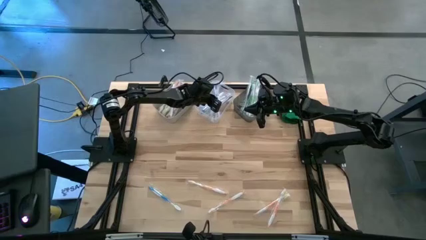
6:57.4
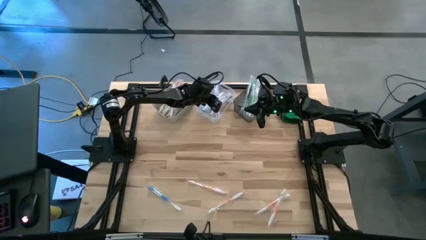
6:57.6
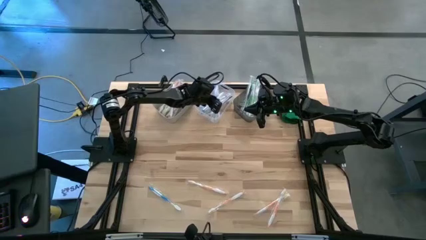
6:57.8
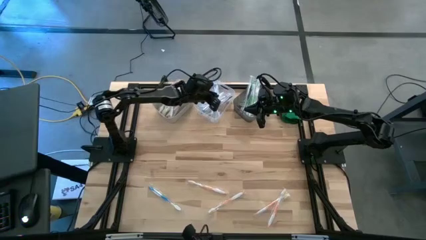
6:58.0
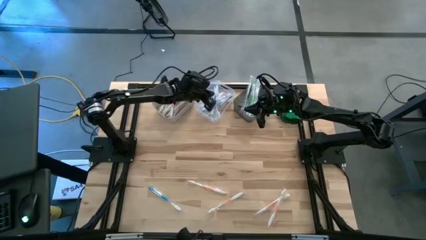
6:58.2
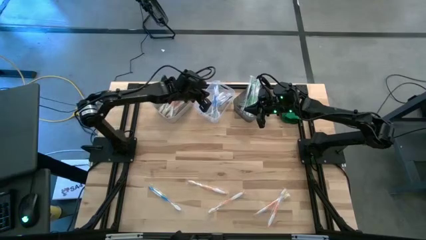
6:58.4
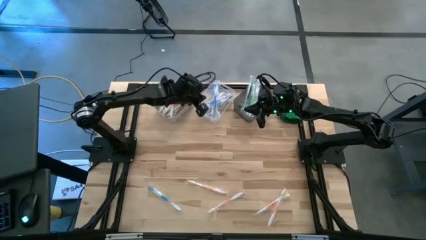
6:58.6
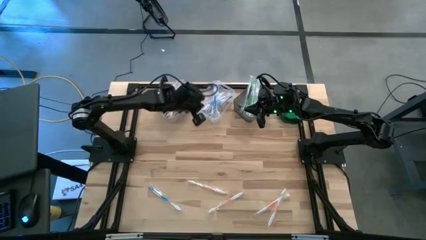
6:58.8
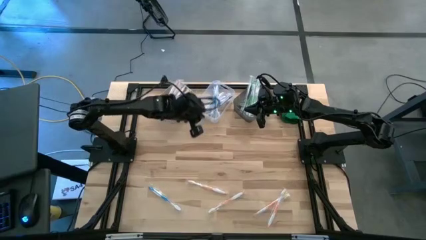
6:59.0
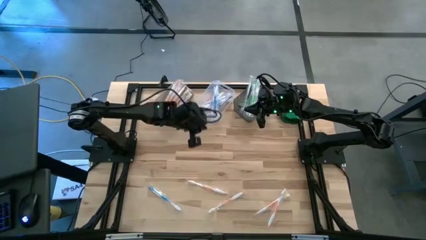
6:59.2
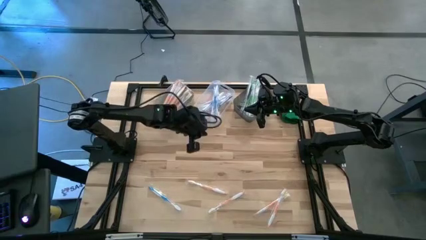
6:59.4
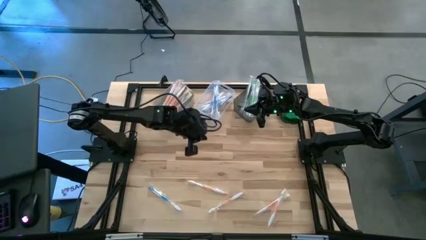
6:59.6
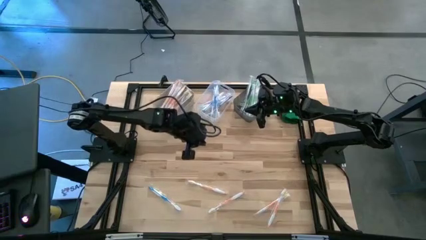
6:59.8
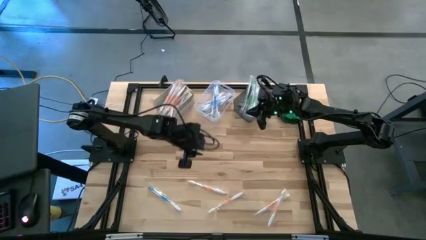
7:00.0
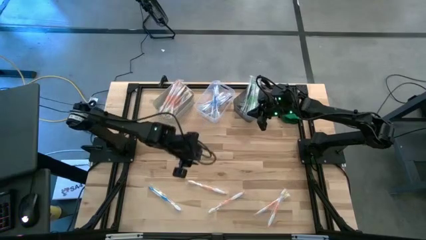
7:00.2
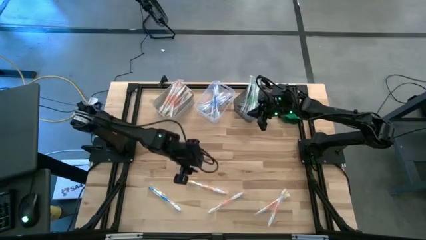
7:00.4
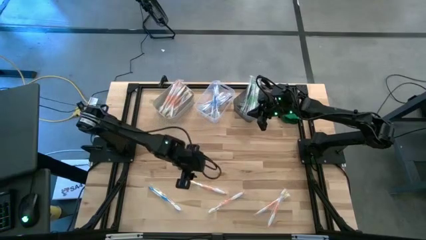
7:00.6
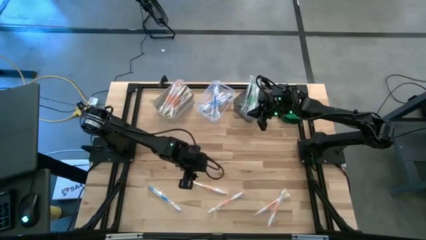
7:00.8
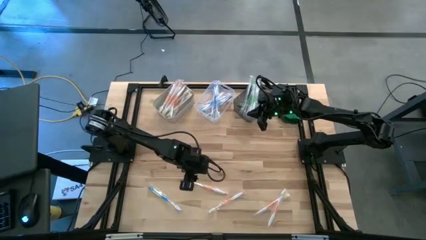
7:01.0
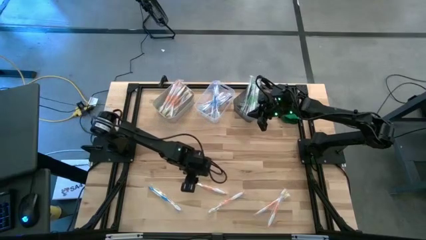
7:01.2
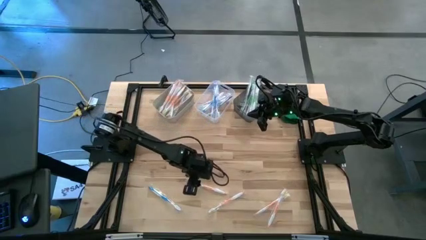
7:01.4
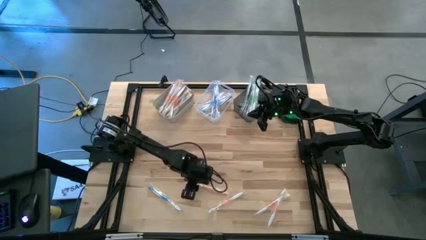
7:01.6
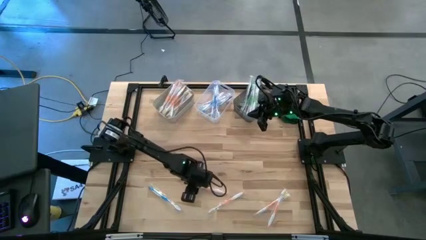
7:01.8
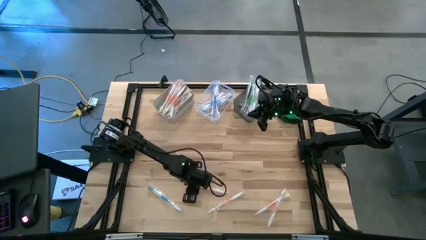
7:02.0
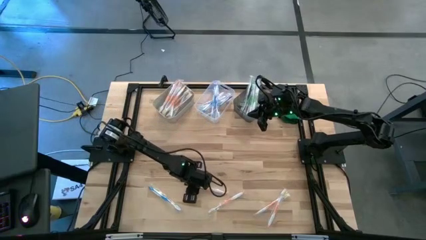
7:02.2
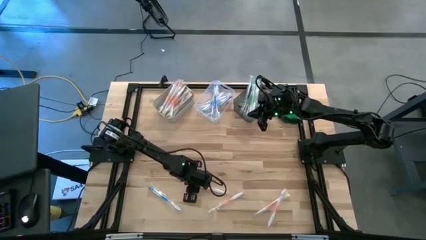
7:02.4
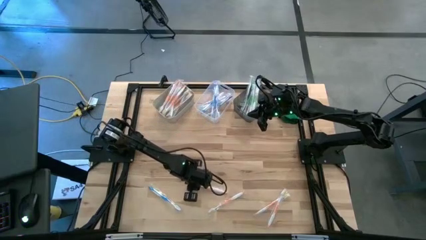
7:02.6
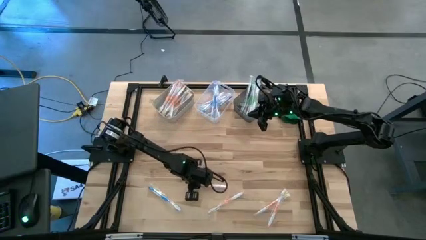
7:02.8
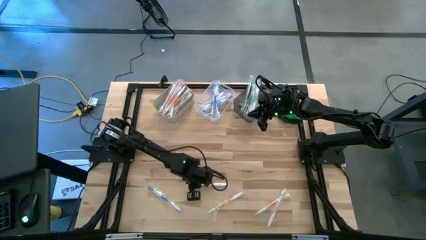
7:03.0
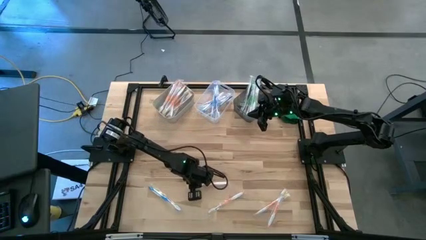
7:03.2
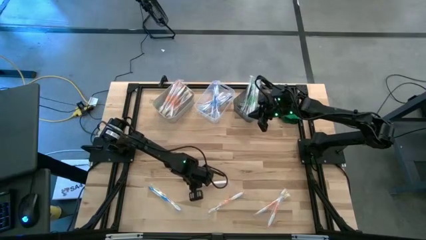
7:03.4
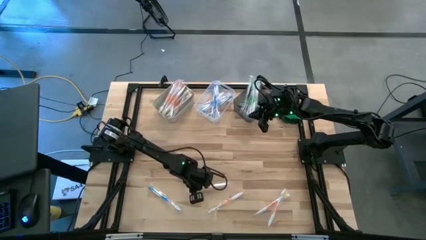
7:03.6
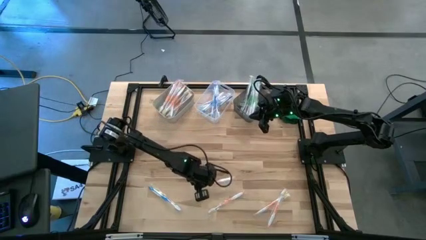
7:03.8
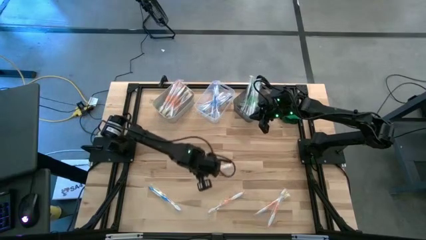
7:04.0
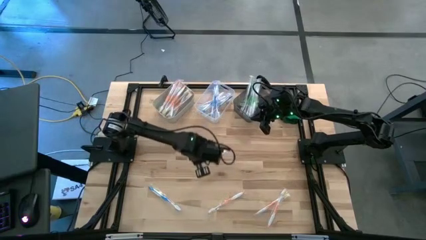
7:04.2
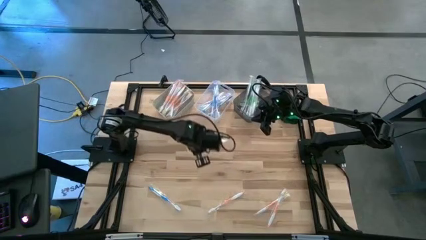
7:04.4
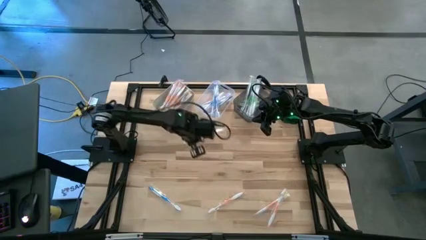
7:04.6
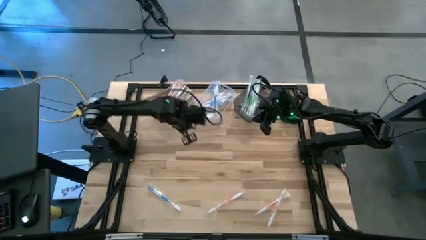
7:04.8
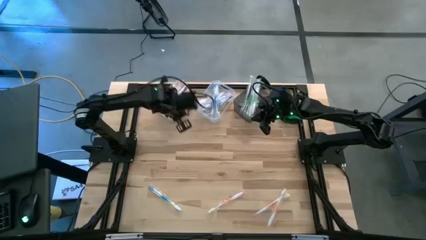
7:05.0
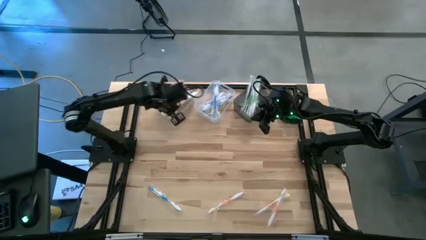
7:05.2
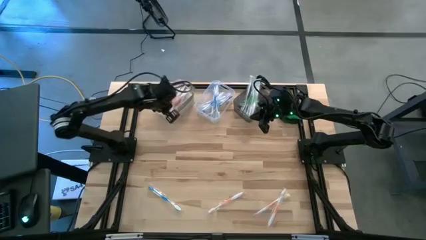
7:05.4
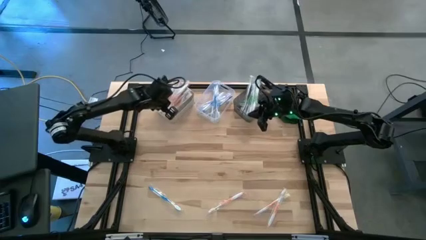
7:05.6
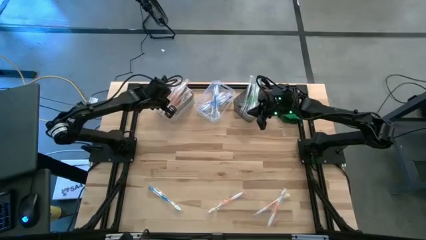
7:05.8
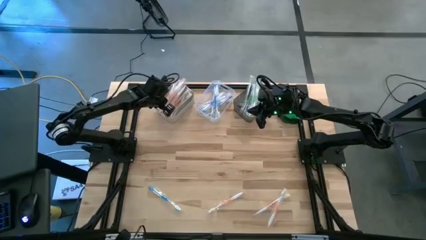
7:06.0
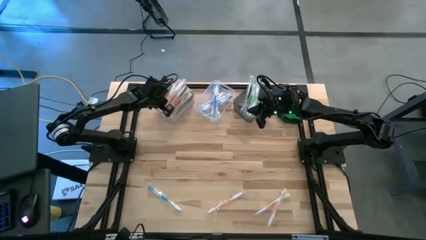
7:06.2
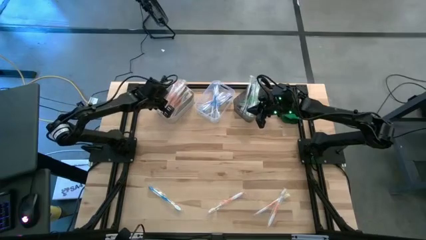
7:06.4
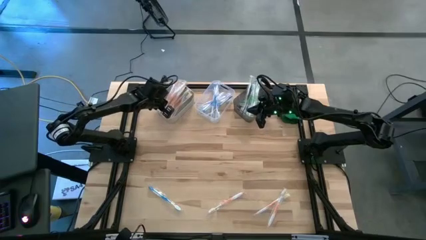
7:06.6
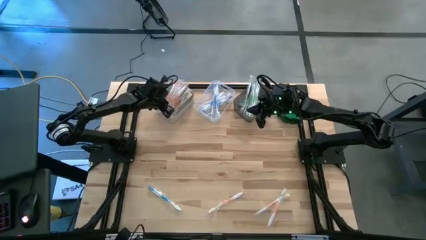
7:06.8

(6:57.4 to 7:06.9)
Task: Pick & Place Toothbrushes
Put the orange toothbrush into the white bin

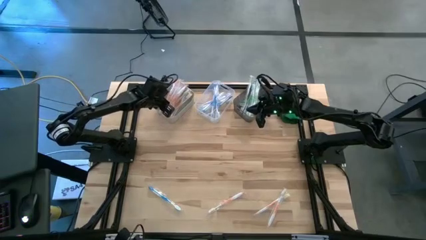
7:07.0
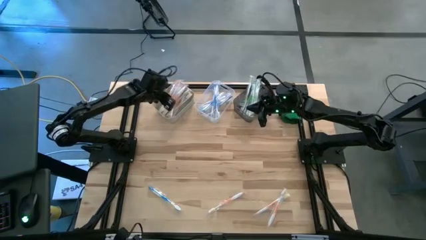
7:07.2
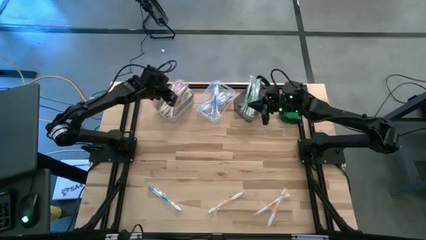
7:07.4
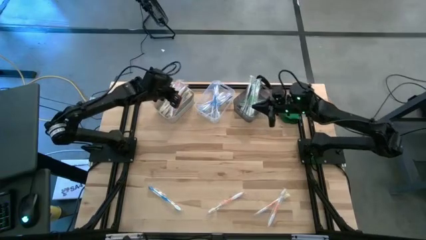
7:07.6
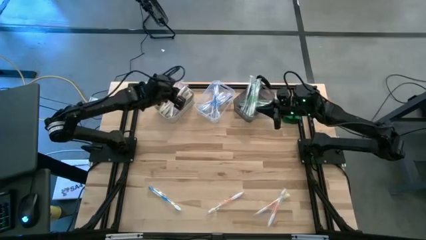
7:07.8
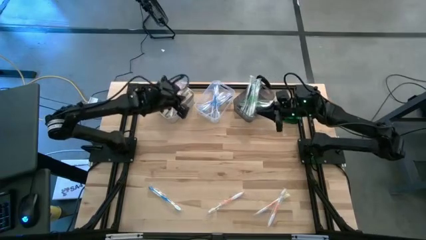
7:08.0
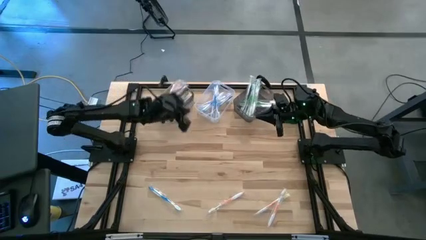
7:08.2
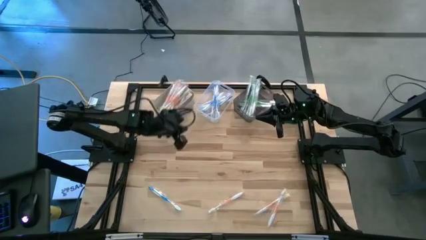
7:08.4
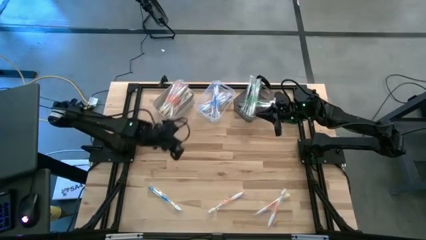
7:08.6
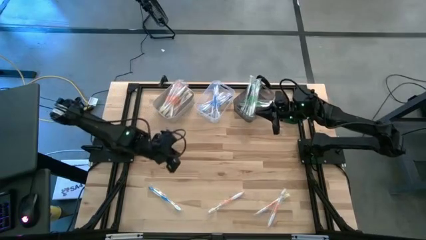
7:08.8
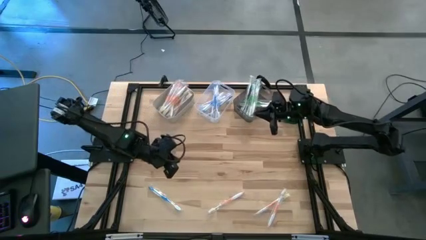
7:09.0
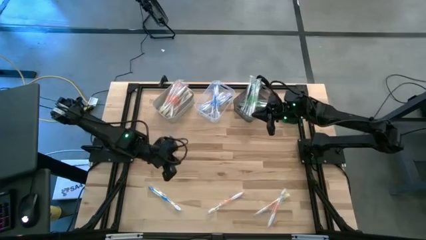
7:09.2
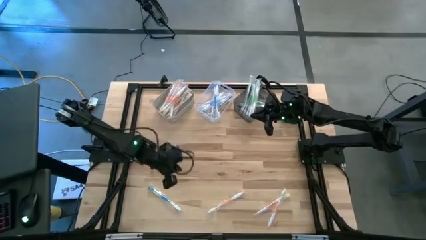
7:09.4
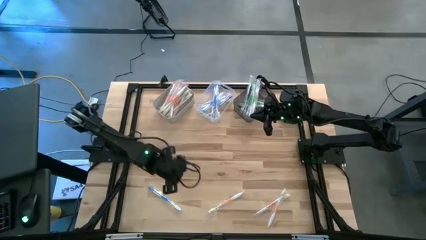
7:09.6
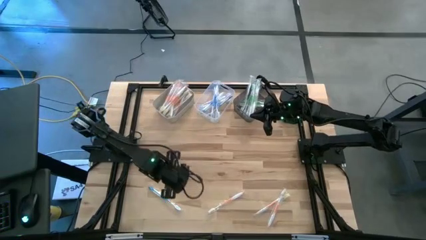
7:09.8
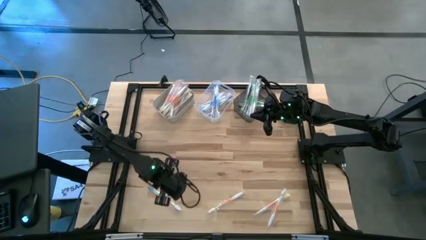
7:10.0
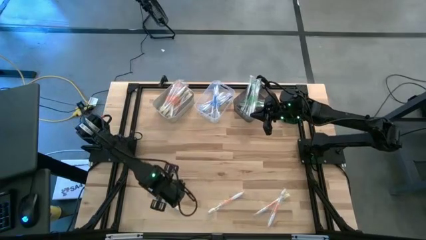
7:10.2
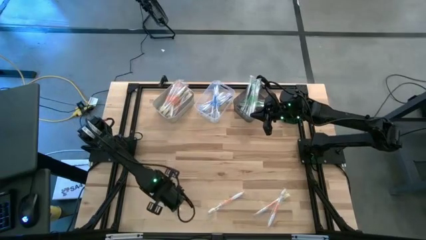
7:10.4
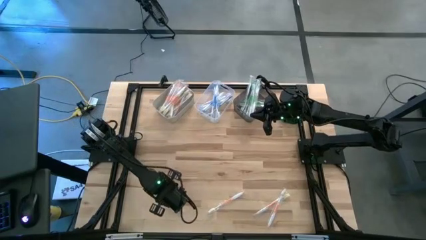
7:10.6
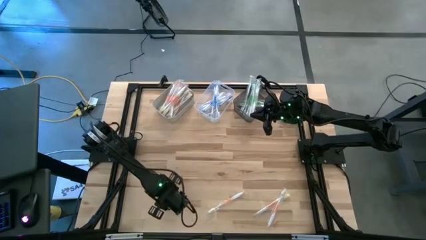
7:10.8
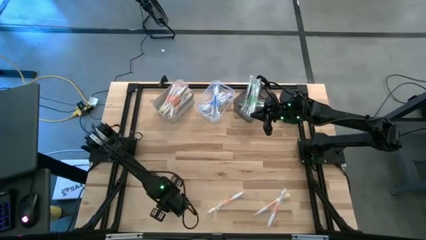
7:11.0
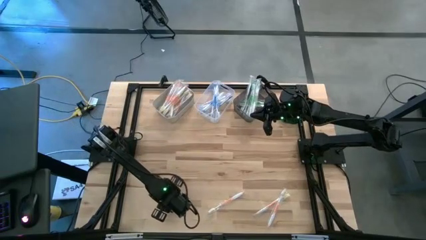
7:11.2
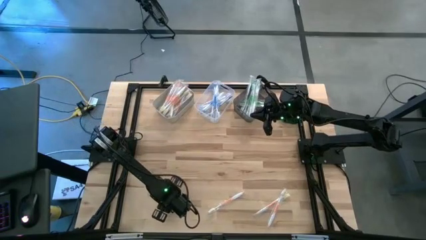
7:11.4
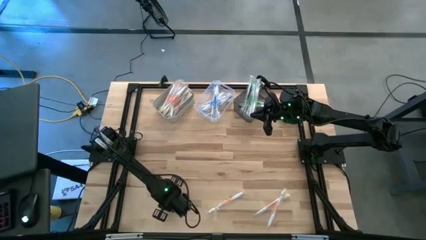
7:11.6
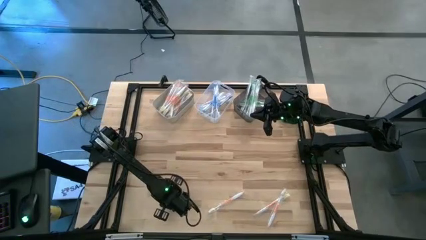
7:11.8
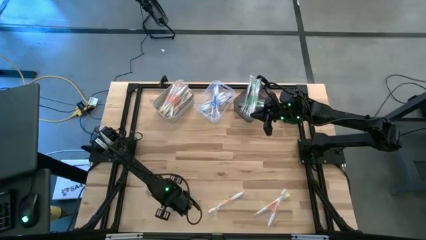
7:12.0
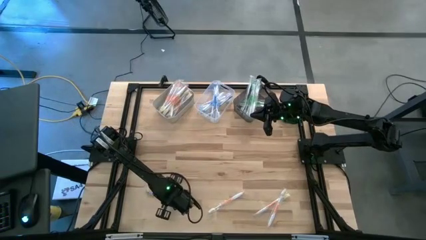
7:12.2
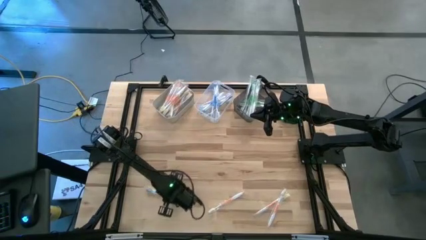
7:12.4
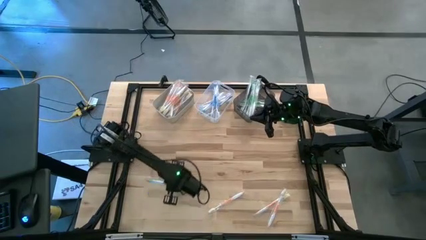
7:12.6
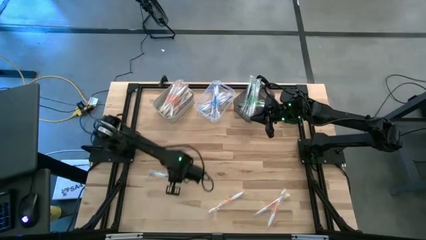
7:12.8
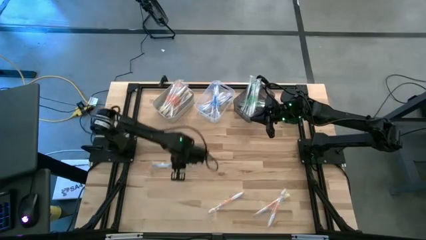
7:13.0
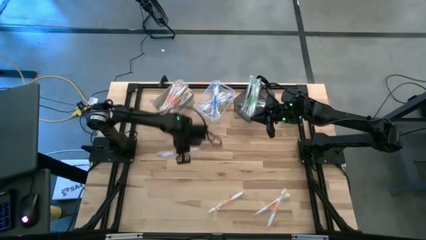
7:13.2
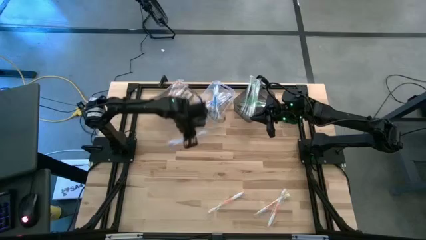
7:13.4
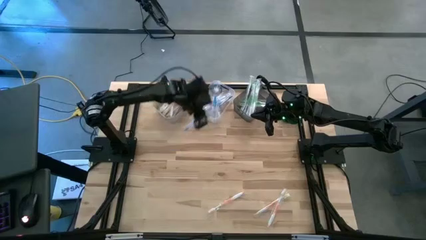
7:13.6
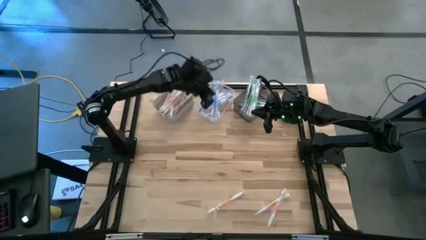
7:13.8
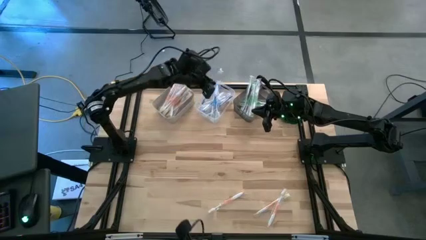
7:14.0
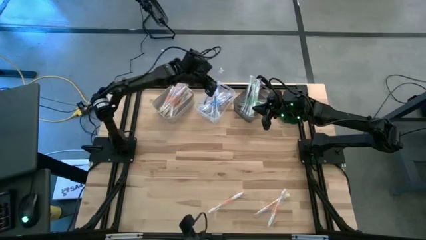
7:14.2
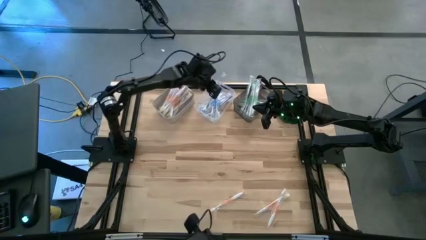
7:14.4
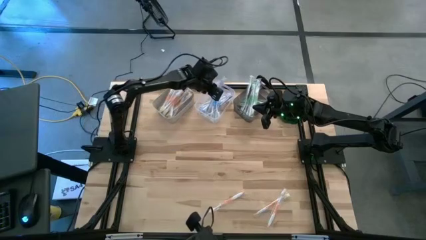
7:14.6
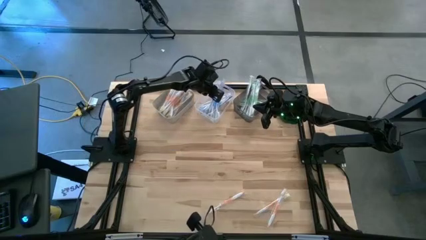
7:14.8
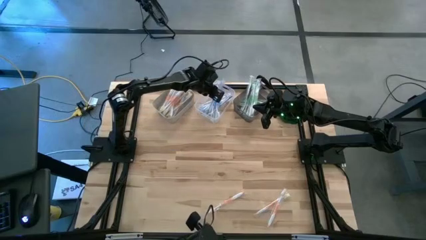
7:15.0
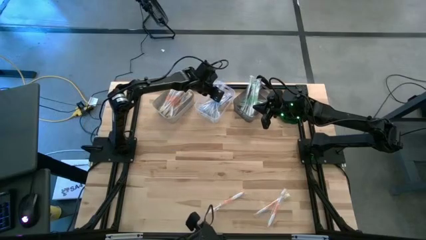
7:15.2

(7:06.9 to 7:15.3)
Put the blue toothbrush into the clear bin
